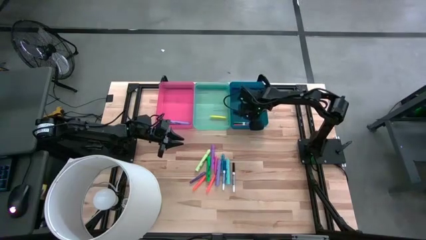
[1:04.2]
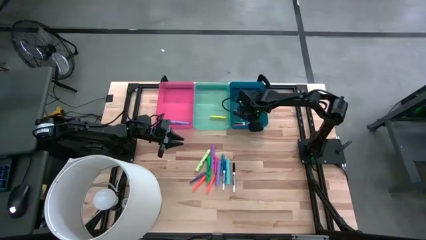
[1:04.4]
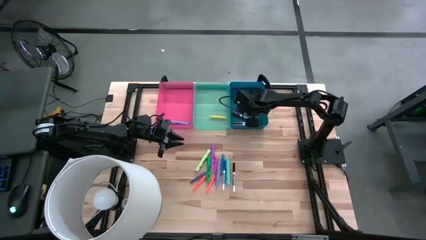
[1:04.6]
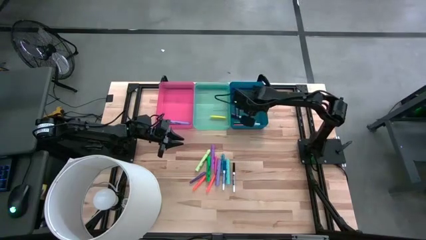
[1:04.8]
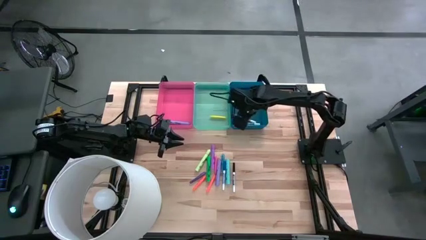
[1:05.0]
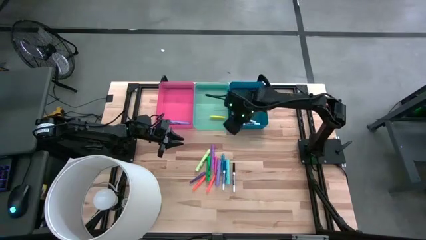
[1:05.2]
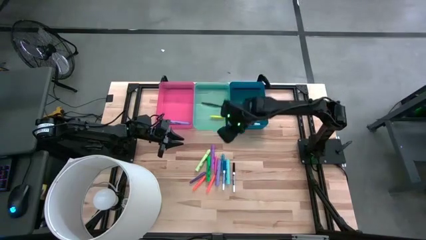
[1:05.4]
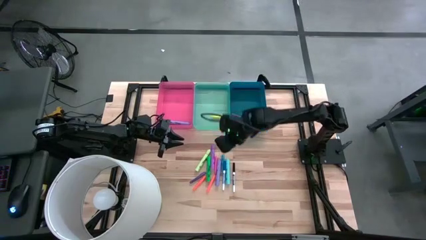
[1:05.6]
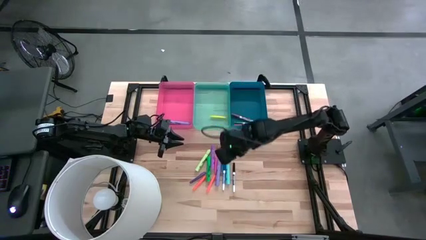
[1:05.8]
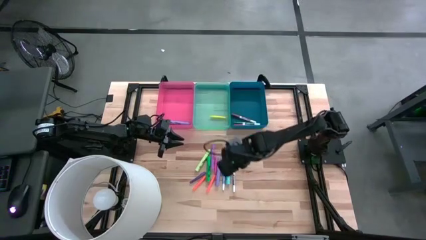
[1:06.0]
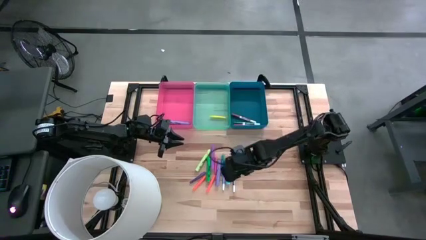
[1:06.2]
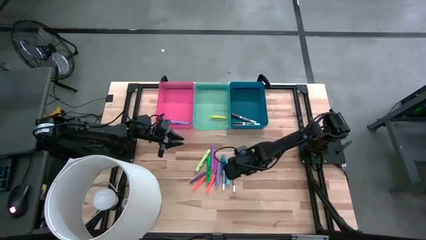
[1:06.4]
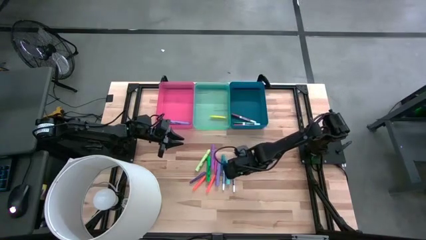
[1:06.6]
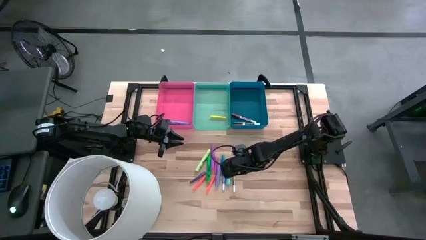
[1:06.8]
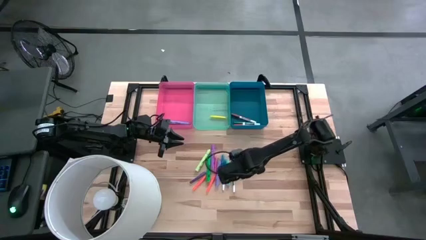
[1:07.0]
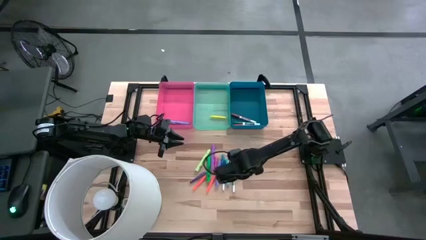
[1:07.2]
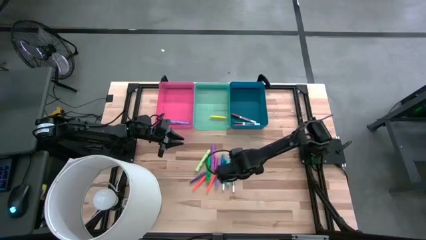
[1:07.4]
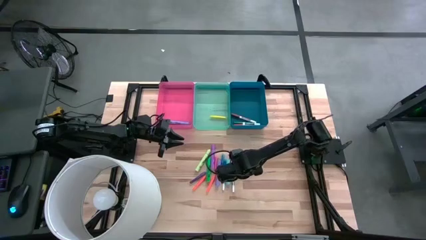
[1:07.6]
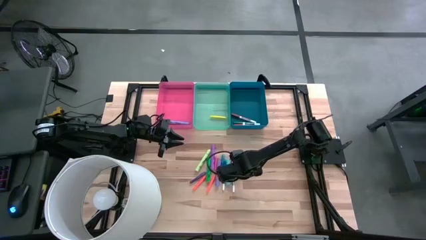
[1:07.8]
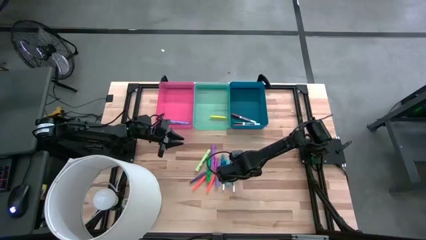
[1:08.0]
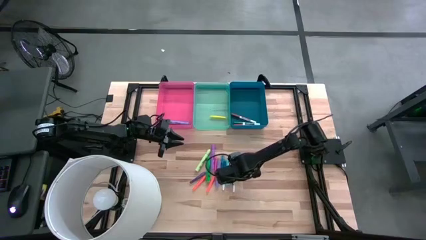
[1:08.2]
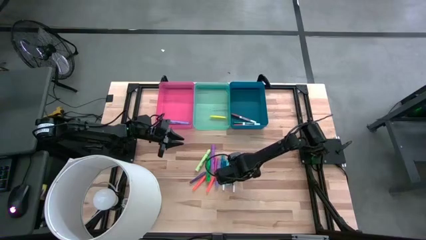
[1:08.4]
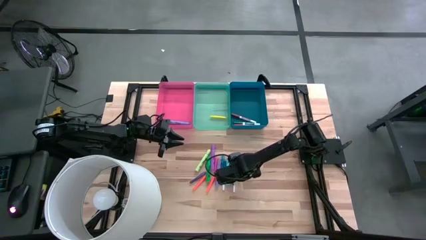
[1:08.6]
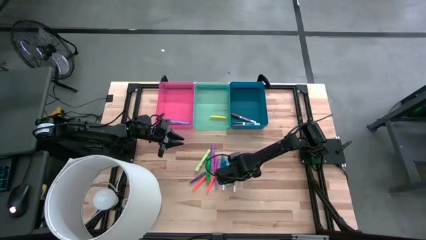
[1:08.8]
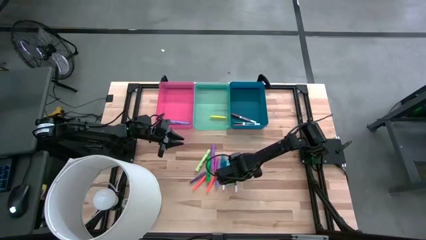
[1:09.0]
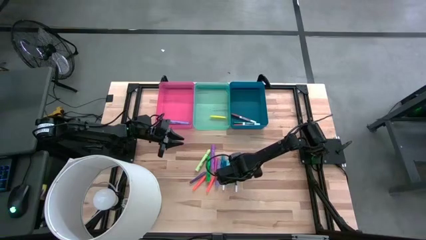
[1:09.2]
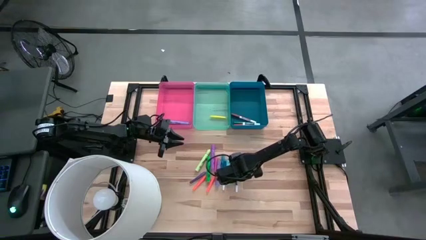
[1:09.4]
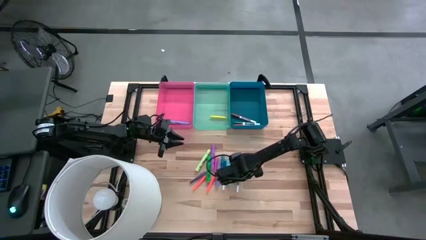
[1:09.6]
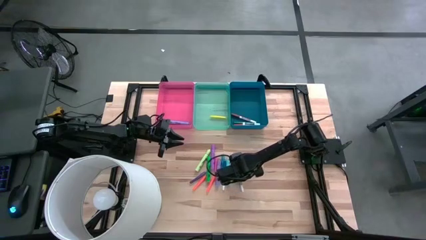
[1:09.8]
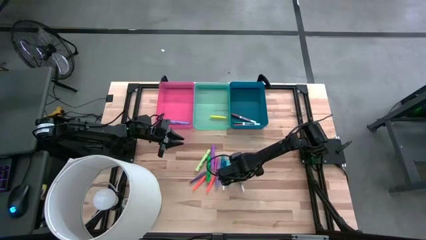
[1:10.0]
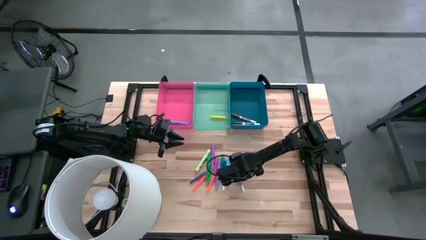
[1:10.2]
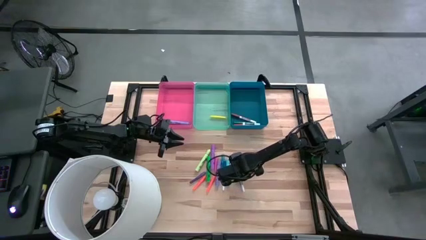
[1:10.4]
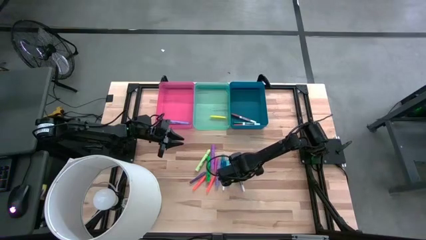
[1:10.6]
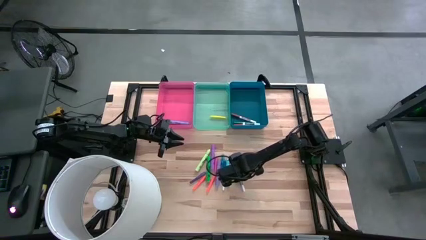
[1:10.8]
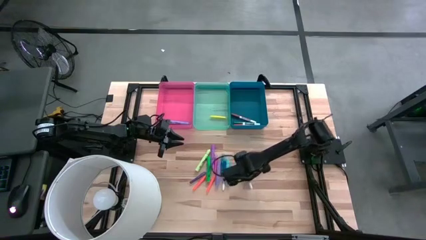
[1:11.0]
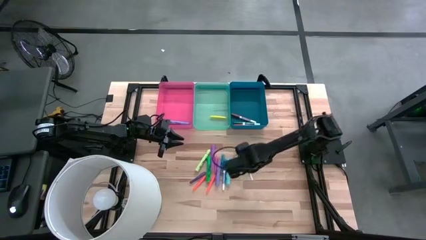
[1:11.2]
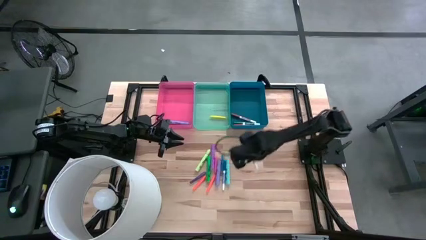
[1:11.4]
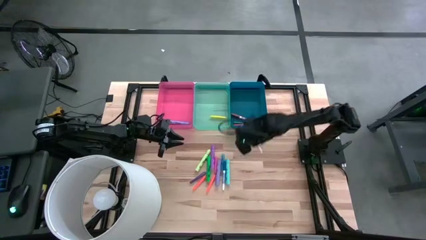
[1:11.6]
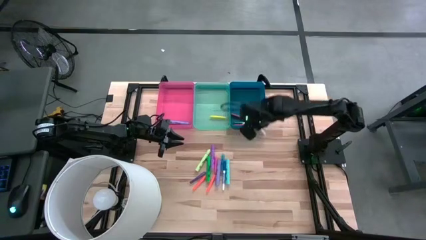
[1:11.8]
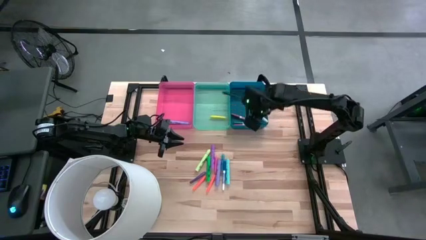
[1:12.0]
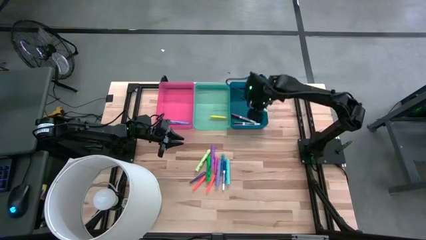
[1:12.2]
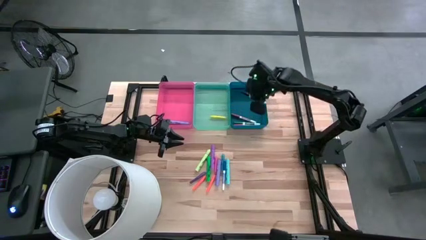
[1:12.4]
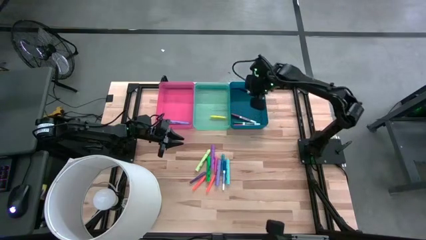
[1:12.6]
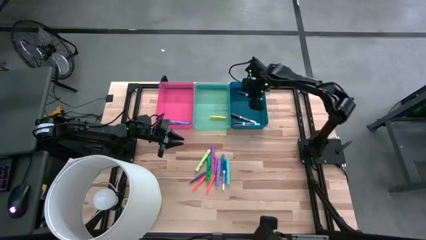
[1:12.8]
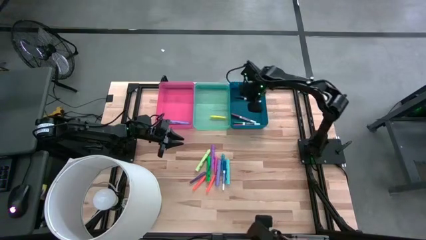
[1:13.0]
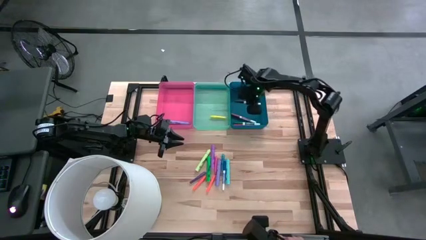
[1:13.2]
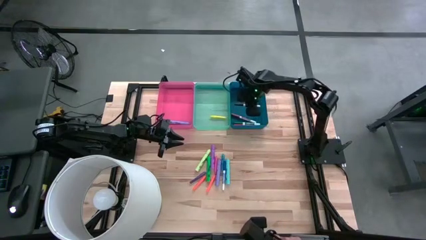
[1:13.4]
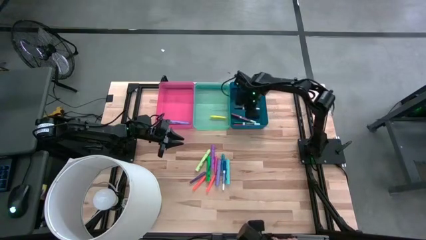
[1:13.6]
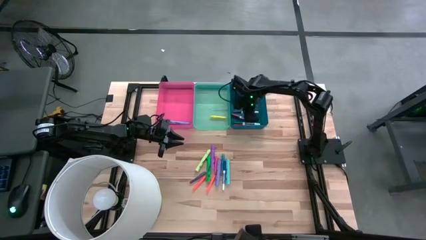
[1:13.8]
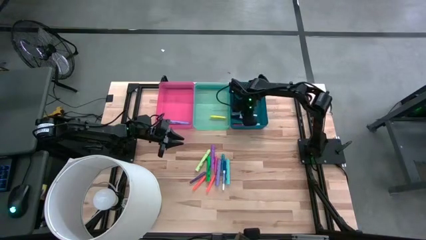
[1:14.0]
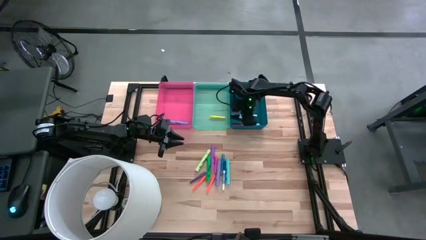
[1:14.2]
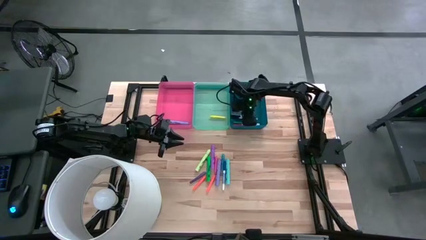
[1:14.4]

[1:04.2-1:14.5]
Task: Pick & Place Markers
Put the black highlighter into the blue bin

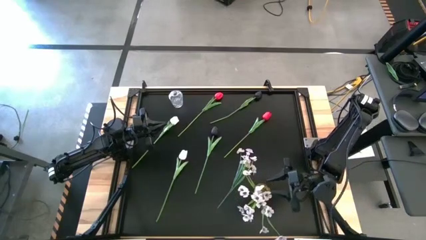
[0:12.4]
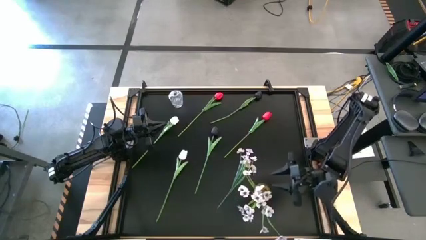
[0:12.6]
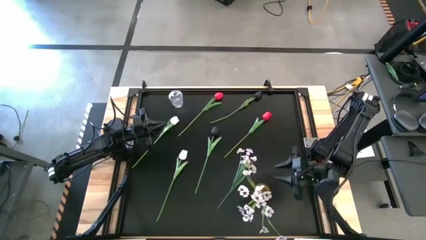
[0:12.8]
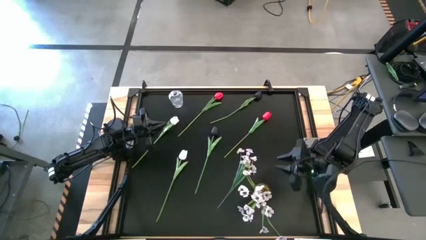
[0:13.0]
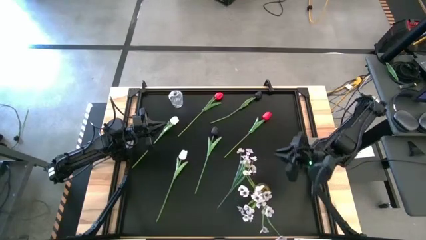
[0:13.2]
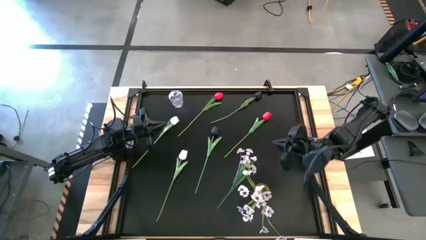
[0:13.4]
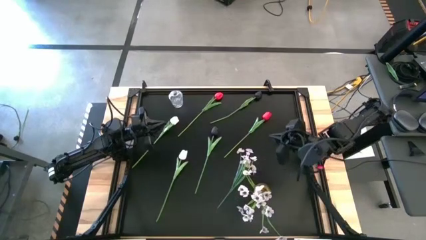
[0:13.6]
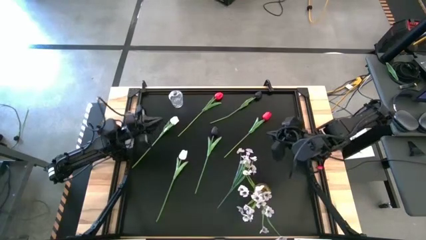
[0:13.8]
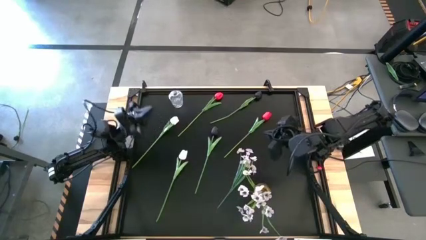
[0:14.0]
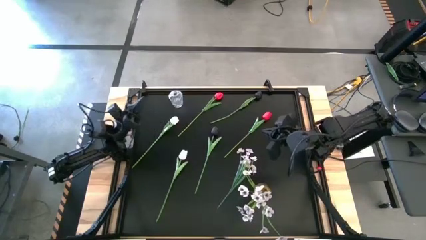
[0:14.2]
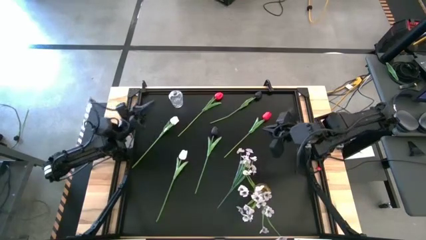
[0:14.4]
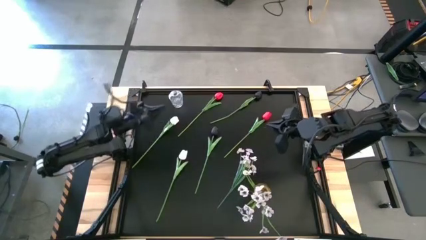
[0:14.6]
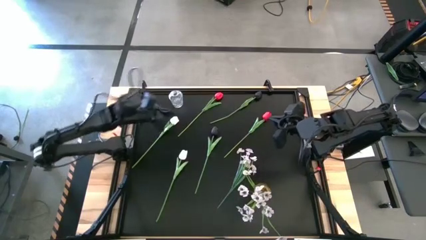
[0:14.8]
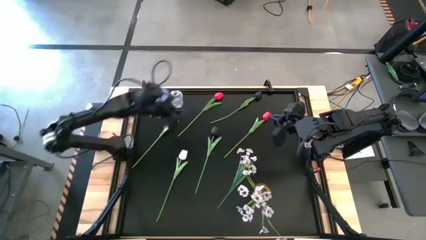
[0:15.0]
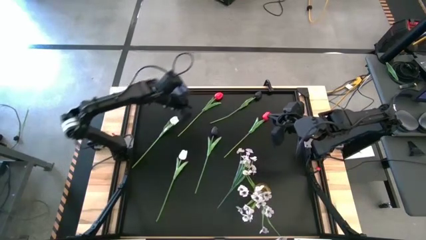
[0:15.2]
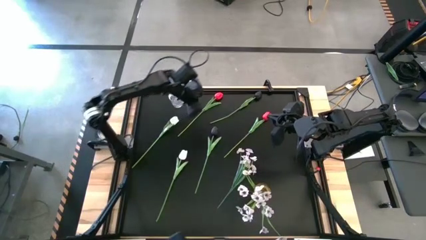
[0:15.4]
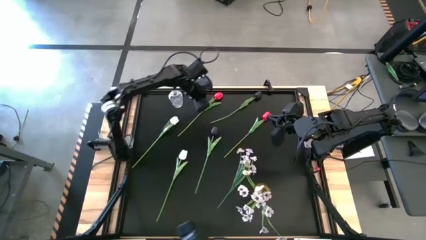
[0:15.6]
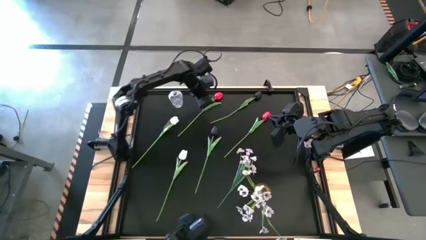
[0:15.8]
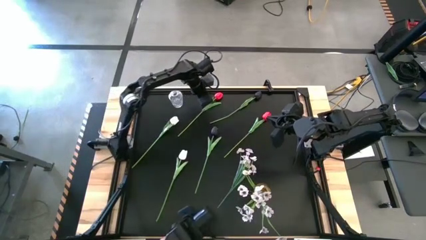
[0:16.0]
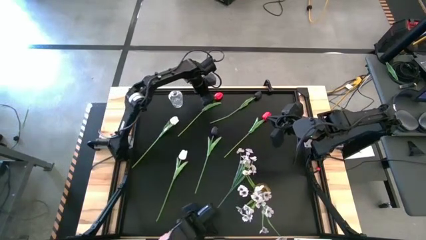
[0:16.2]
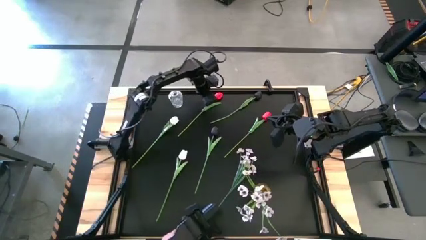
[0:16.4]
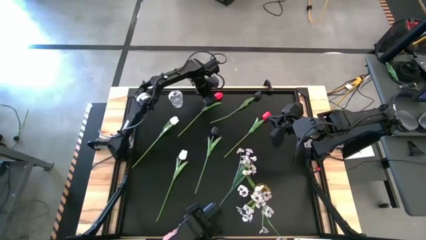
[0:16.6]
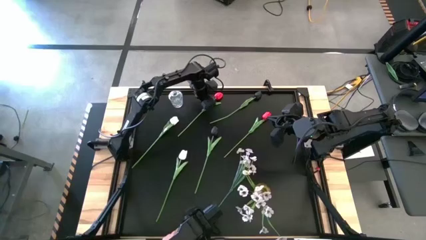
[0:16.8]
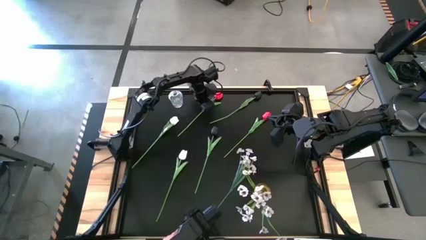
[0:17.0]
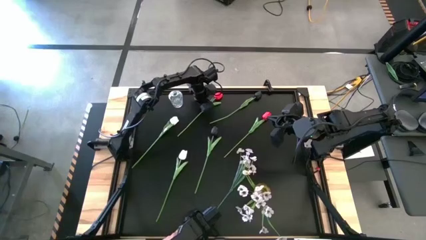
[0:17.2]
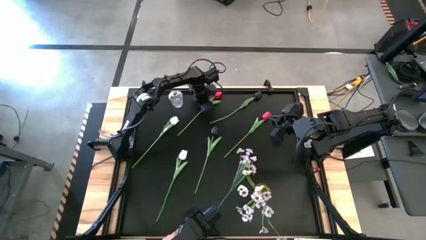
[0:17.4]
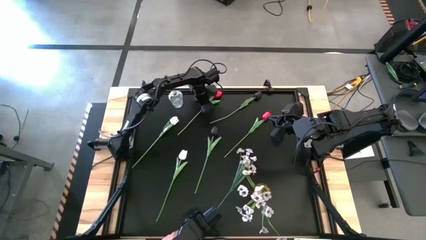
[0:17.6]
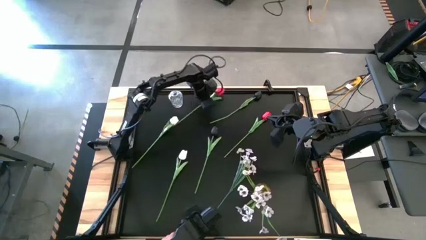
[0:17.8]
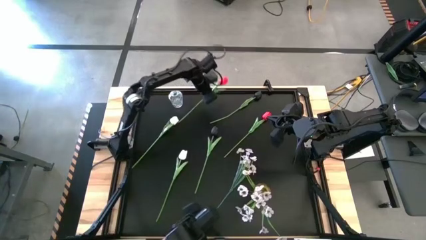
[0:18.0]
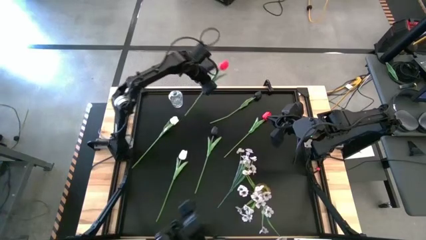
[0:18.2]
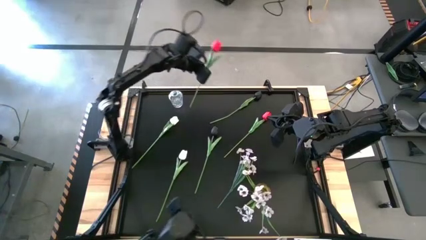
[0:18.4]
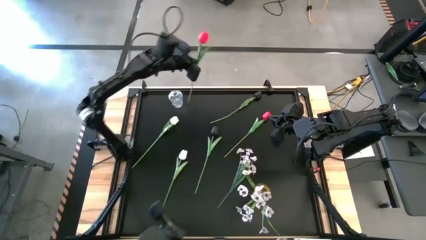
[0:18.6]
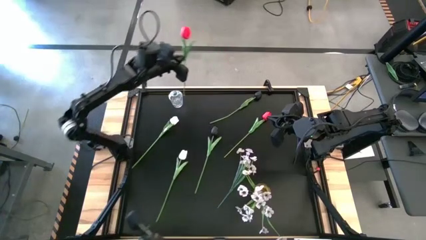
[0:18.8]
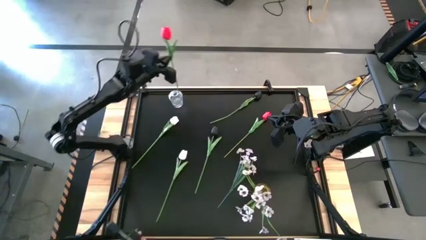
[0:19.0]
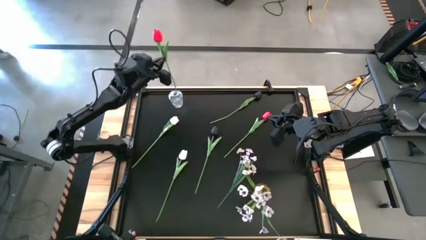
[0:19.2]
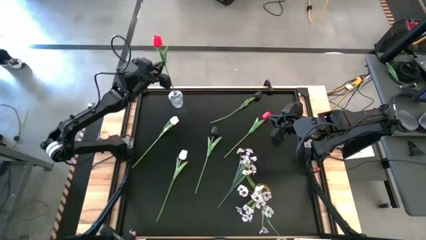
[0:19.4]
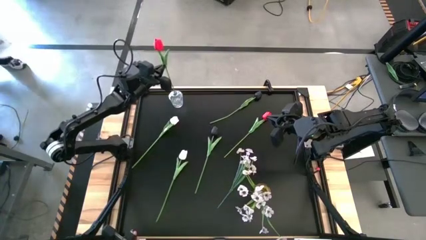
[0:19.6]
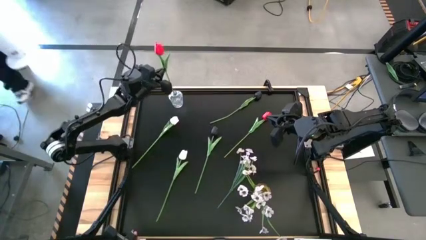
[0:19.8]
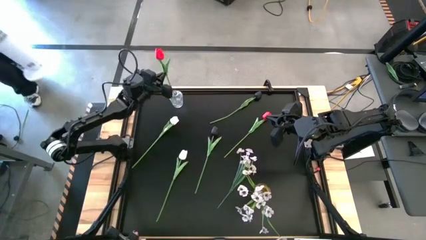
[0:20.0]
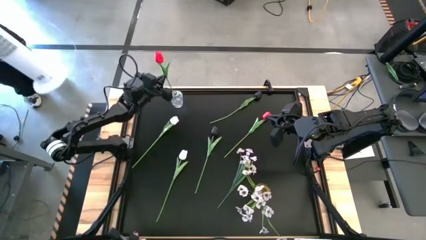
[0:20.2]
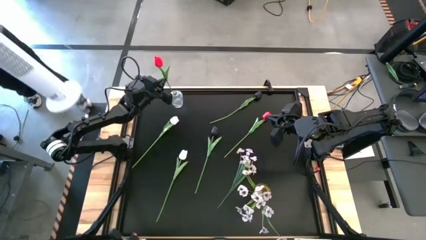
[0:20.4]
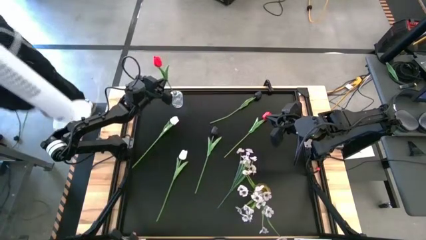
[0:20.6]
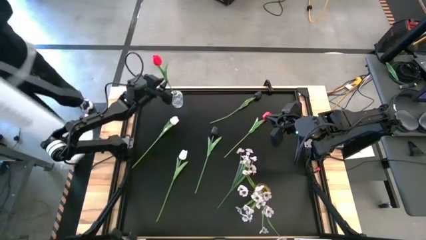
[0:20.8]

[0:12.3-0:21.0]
Task: Sort flowers into vase by color
Put the left red flower into the transparent vase
